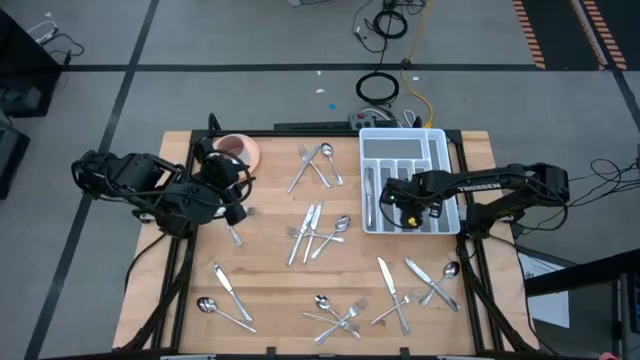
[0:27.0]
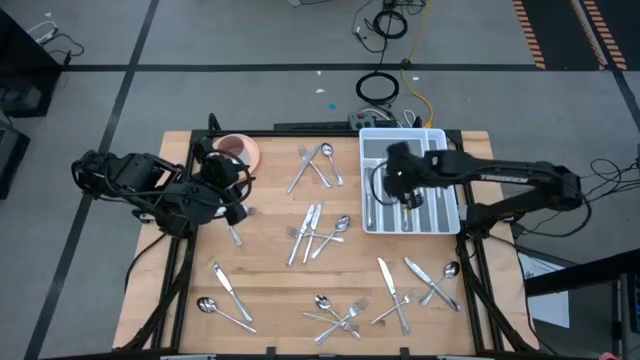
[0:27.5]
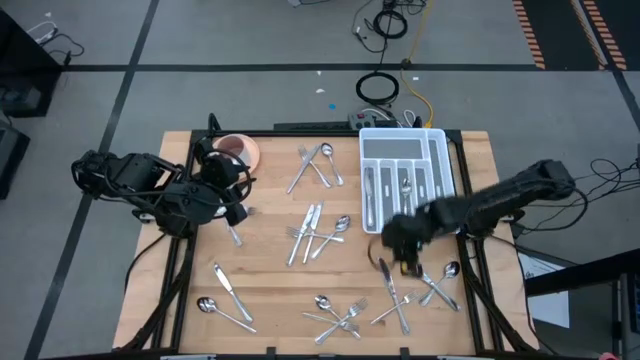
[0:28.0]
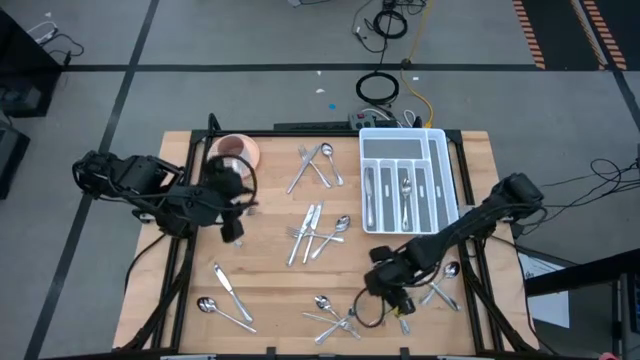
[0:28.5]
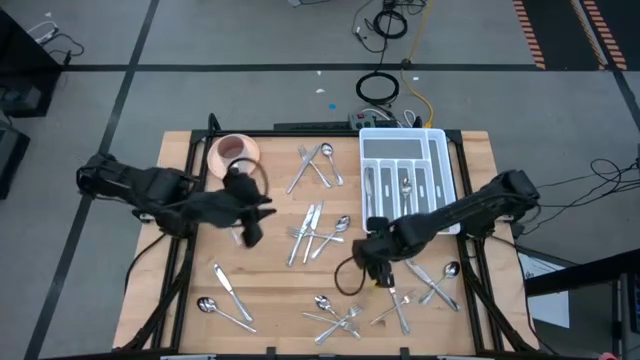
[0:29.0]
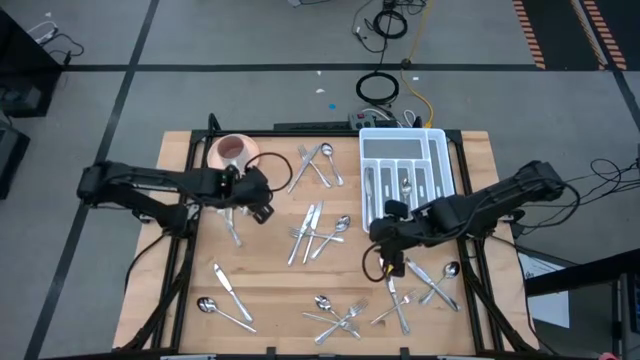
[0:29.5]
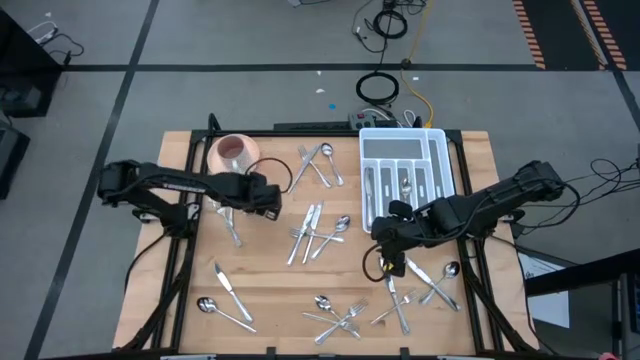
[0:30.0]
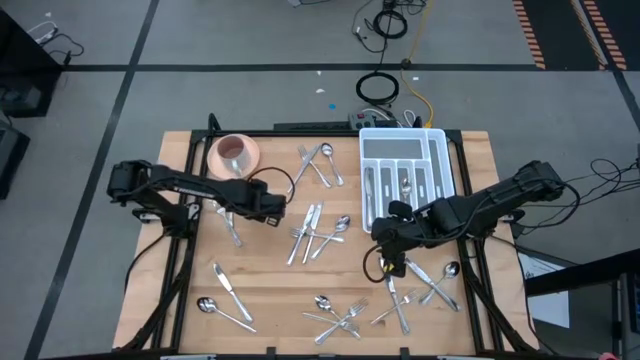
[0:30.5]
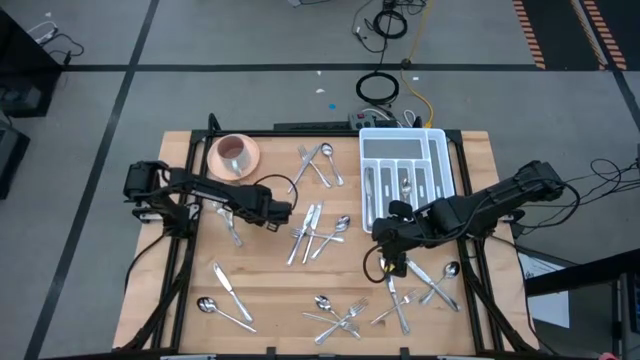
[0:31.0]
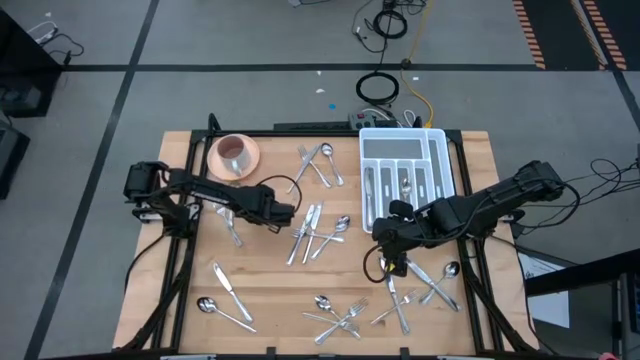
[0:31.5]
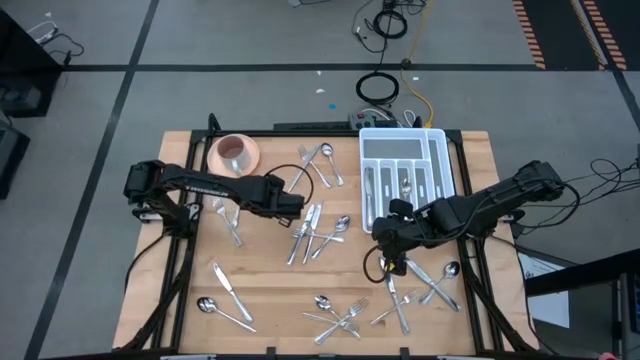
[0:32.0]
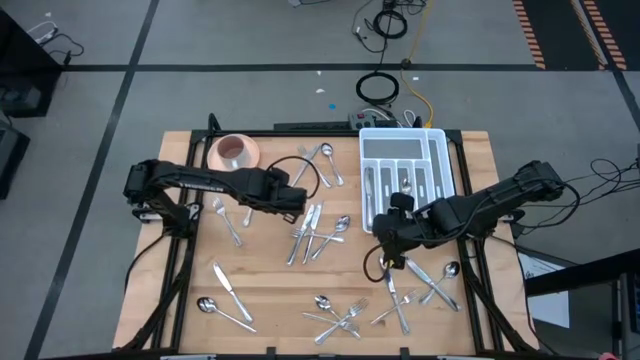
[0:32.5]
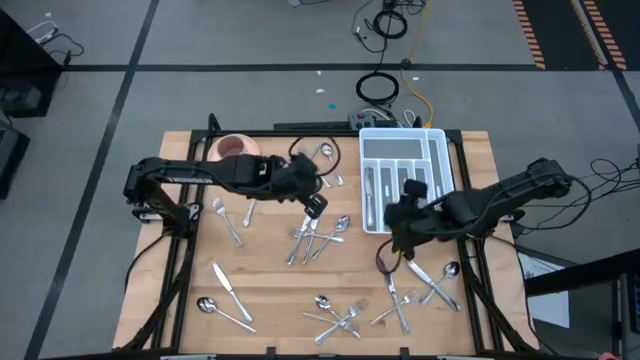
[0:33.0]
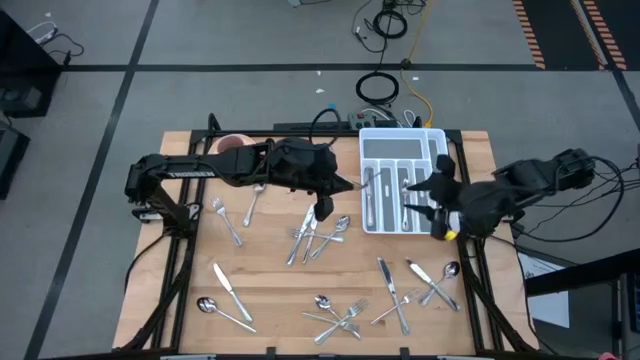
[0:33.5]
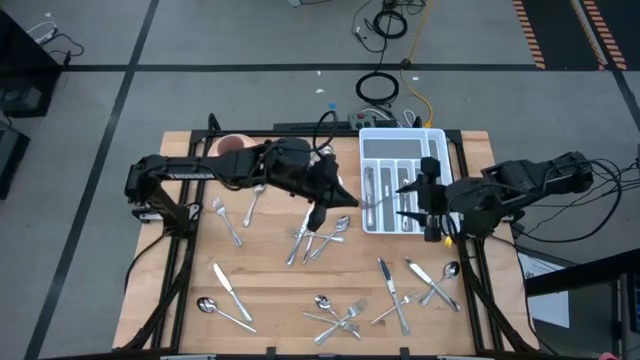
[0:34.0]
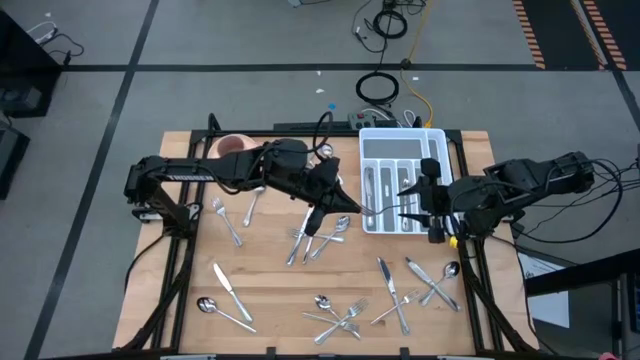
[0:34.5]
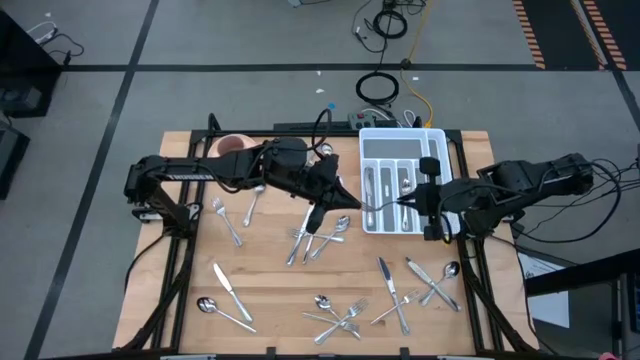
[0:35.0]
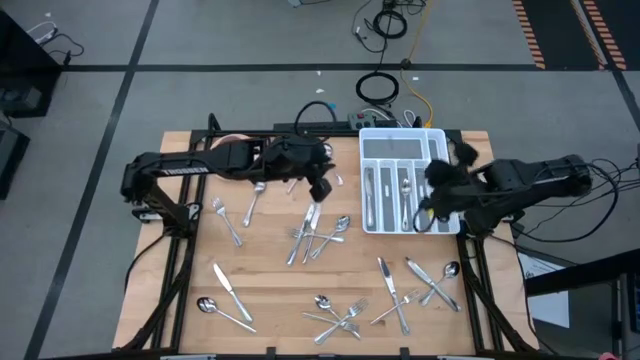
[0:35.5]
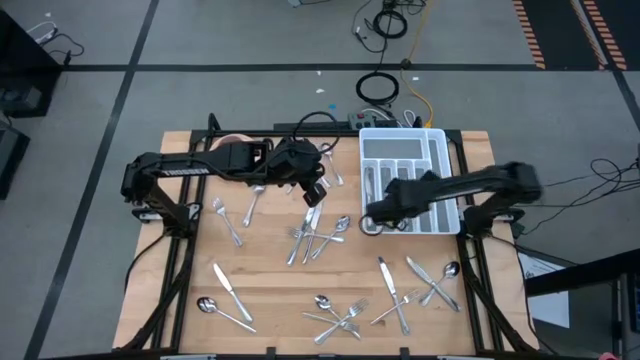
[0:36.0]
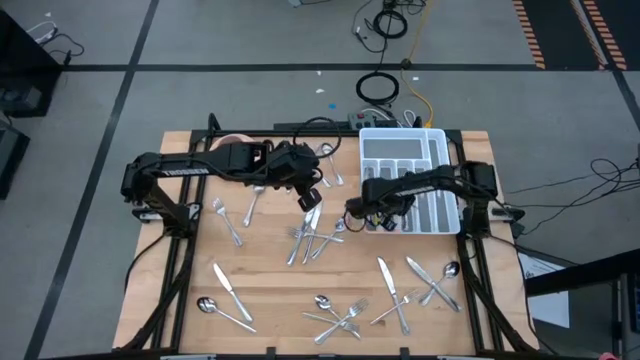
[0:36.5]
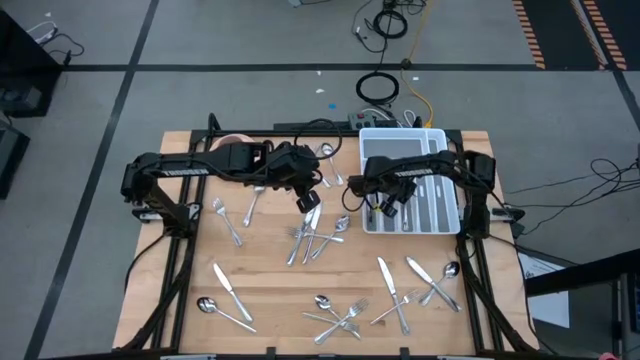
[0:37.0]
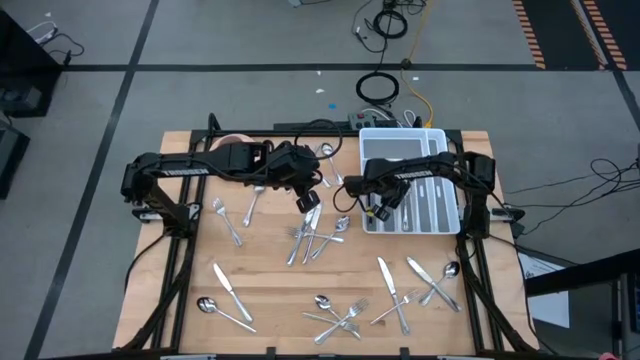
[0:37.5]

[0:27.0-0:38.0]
Task: Sort silverware
Put the silver fork into the white cutlery tray

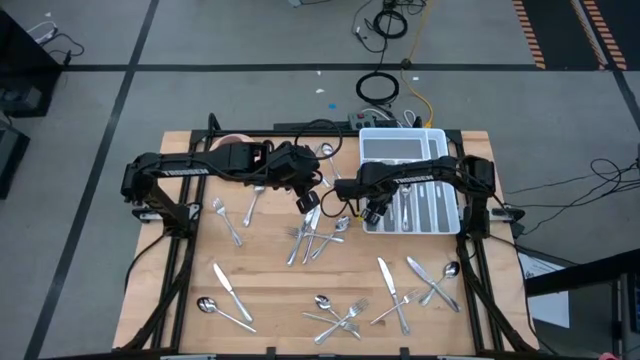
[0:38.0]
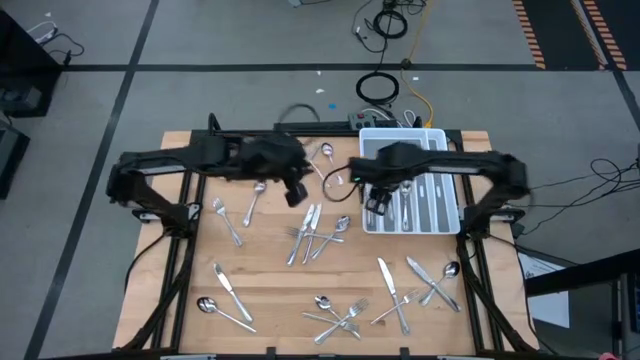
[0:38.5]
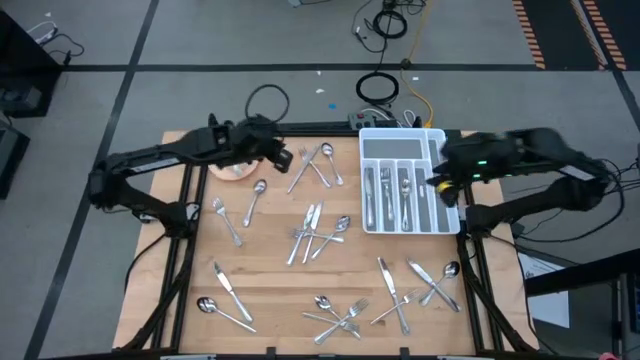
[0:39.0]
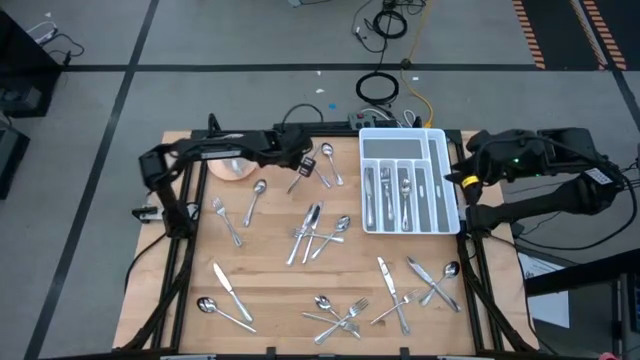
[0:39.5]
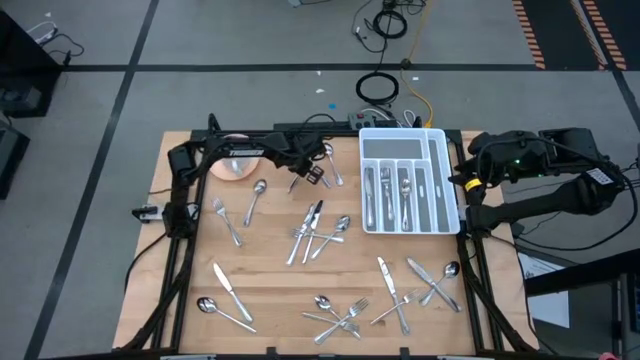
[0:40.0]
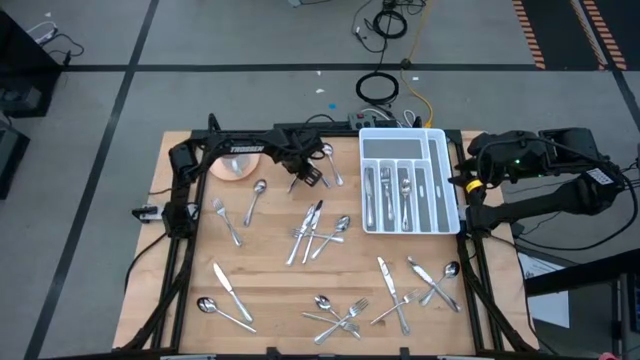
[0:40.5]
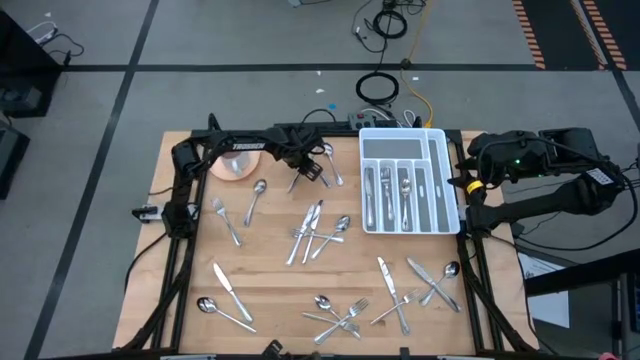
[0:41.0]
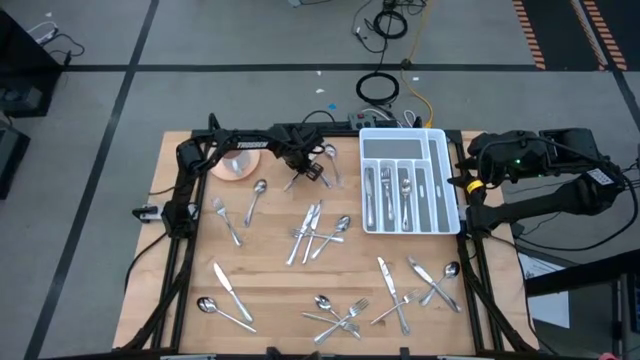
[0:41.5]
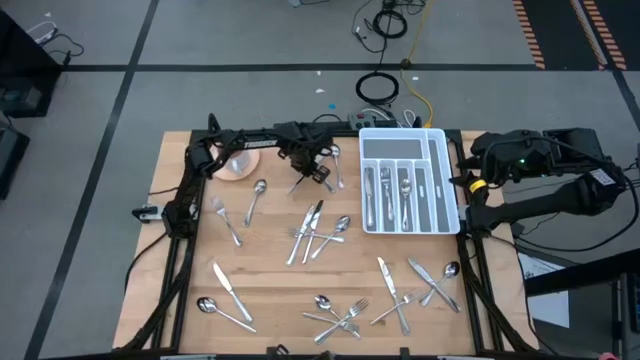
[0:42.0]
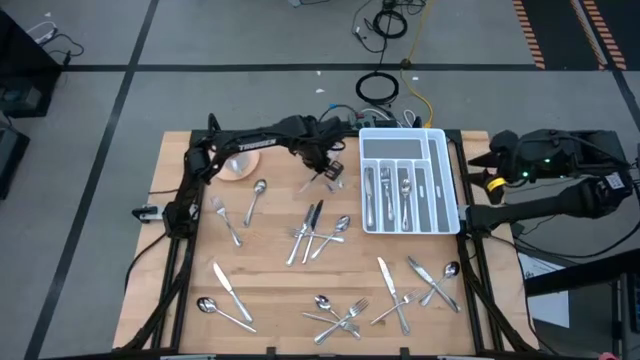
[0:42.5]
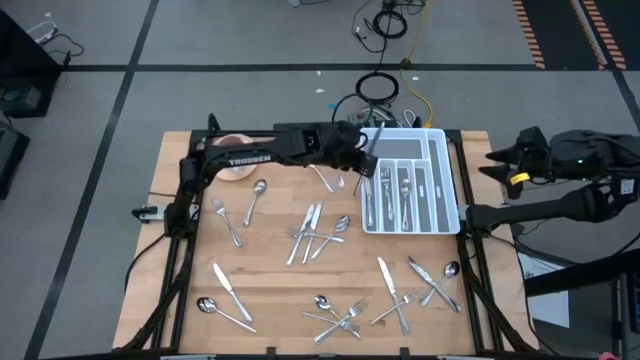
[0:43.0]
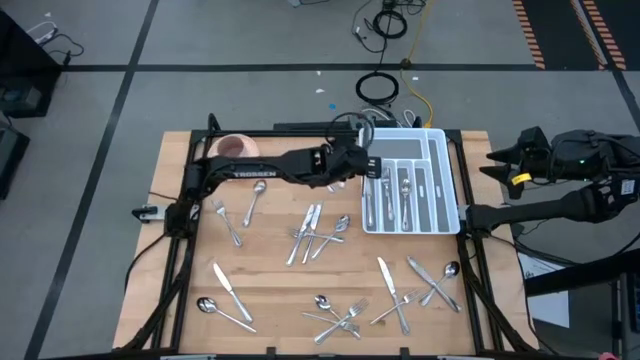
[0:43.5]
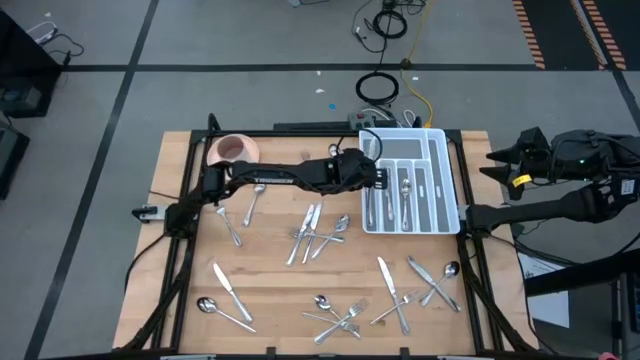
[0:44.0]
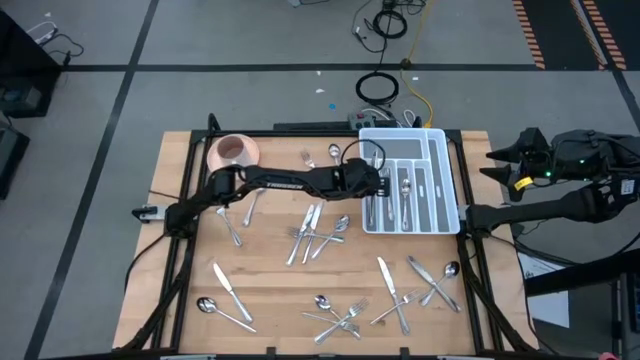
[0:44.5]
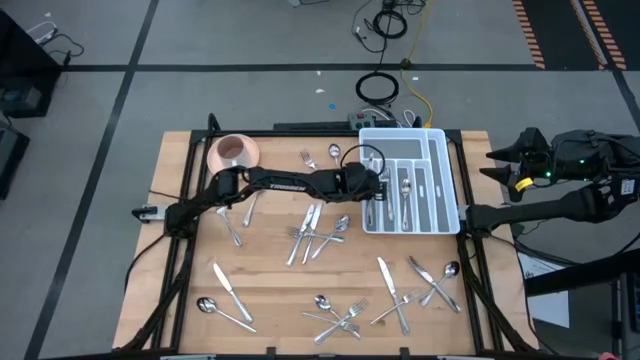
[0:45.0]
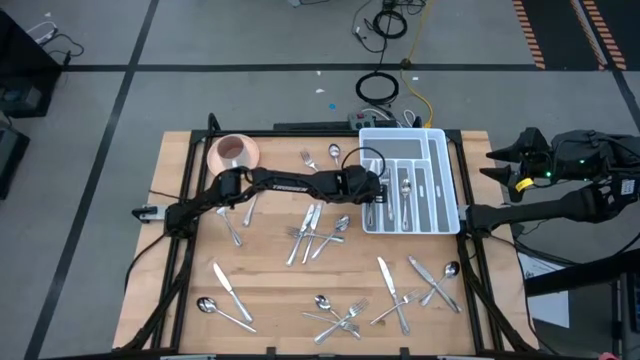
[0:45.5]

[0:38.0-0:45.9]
Put the silver knife into the white cutlery tray

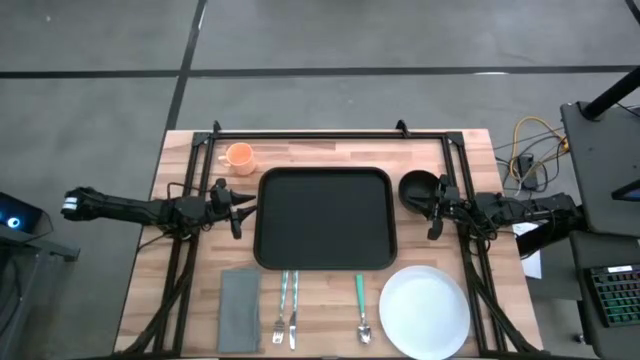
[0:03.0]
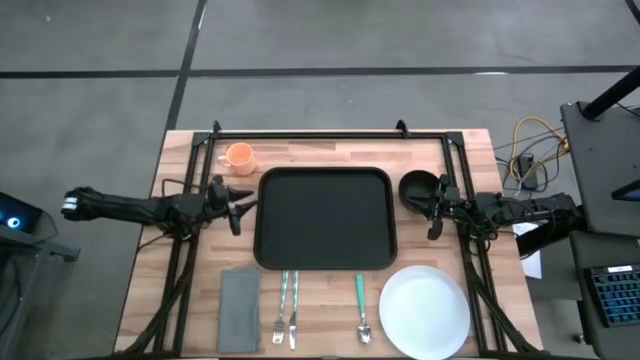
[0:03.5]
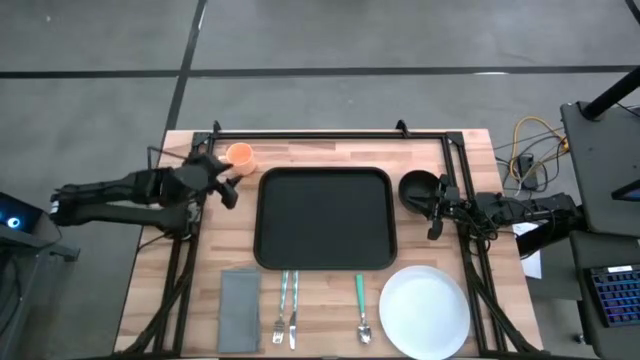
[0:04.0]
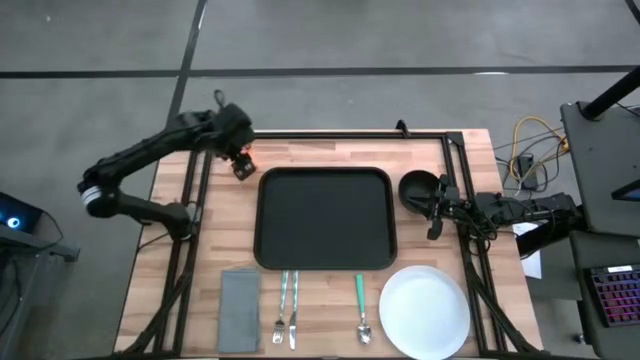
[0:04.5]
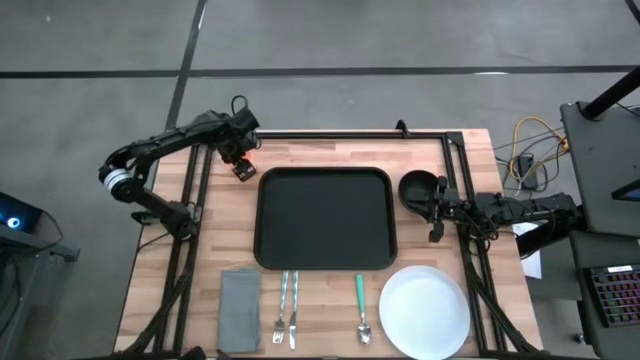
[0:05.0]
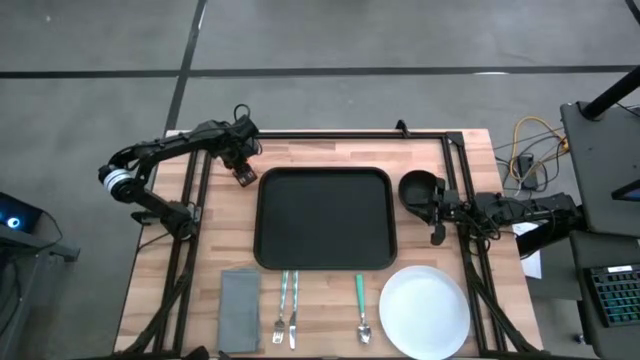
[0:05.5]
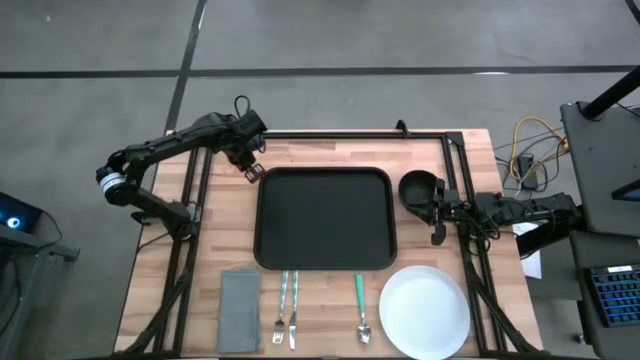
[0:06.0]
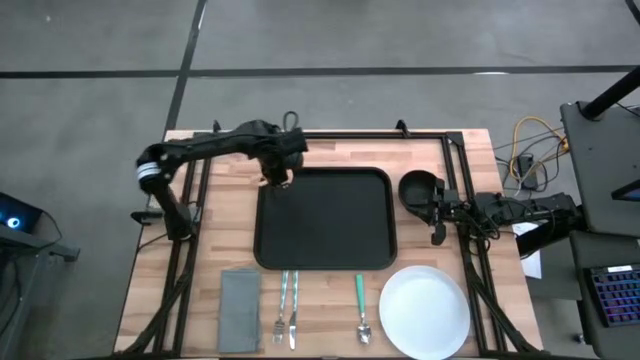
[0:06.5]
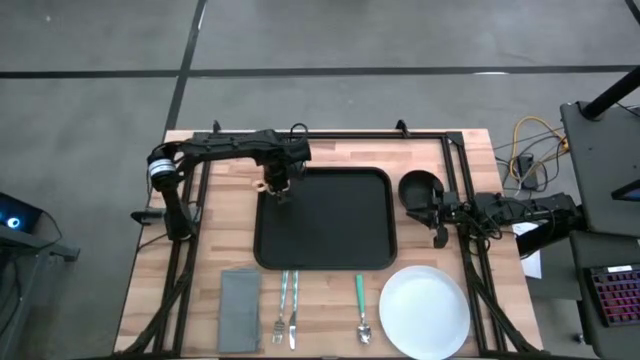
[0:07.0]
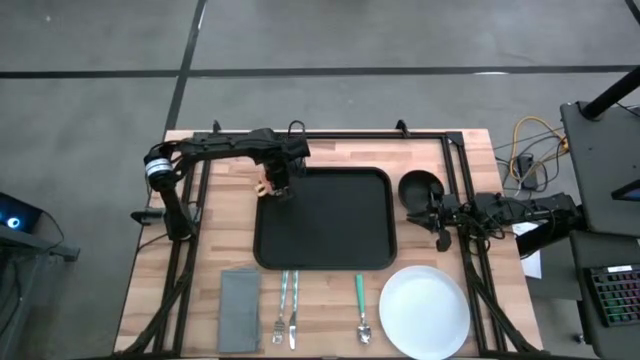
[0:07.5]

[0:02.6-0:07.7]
Task: Set up tray
Put the orange mug on the top left of the black serving tray
